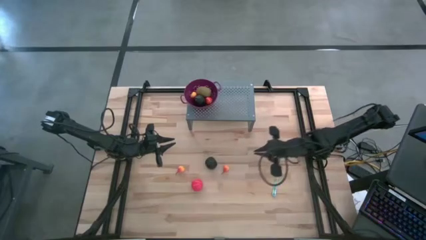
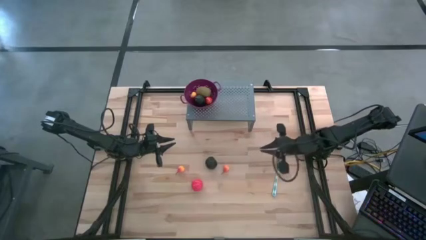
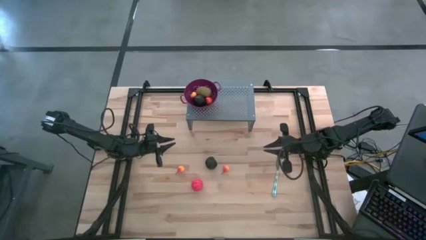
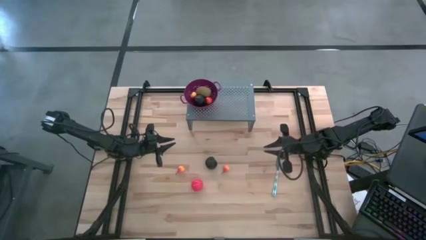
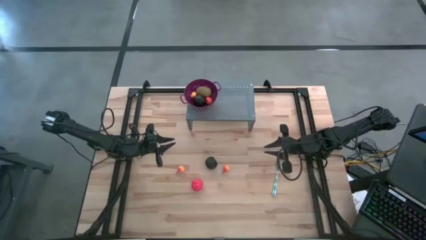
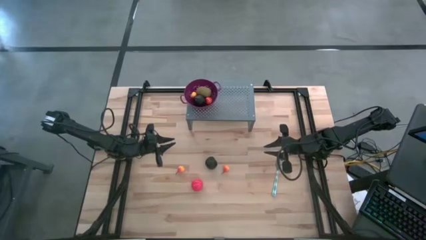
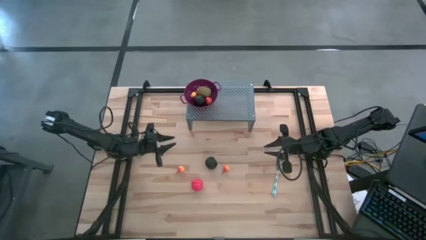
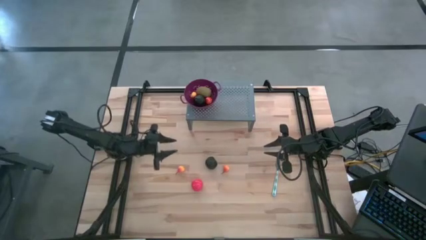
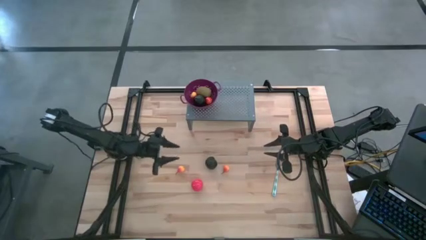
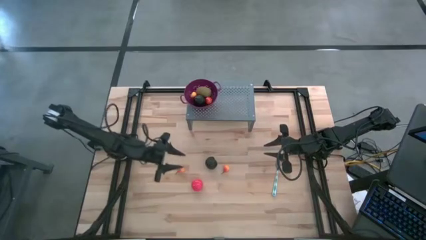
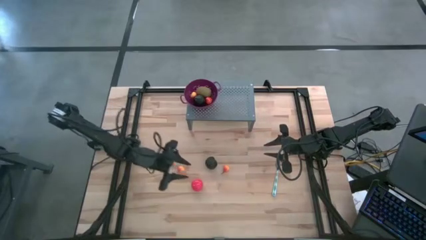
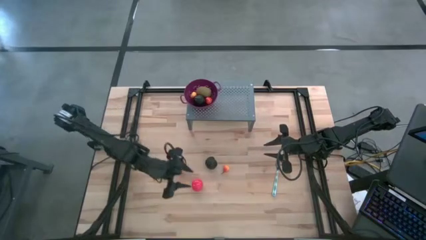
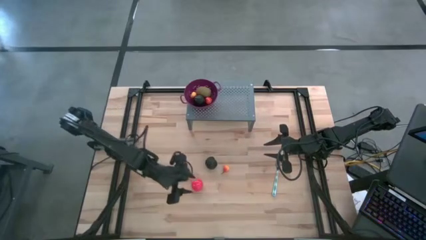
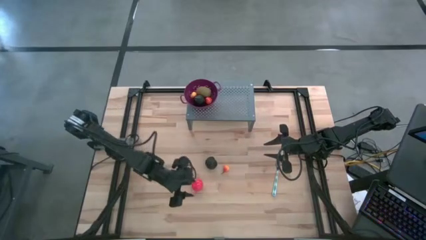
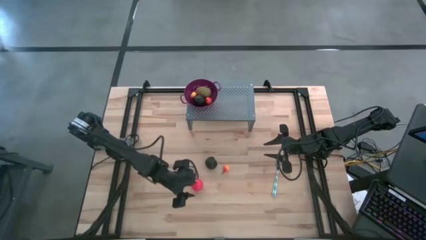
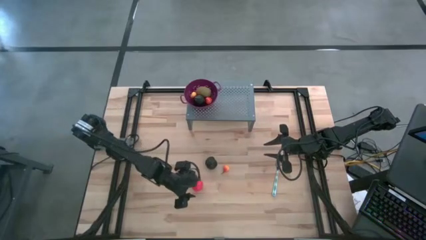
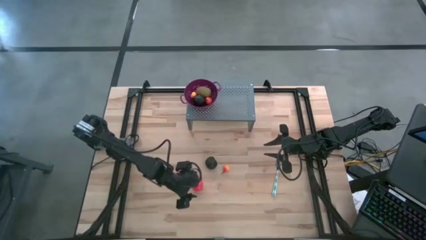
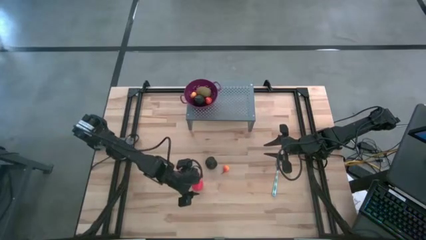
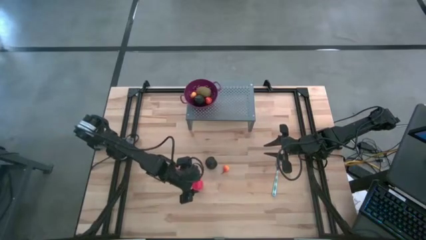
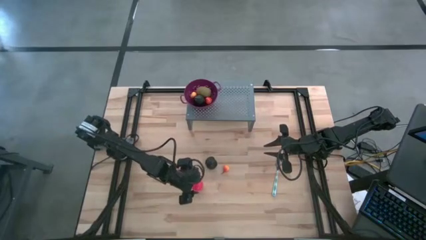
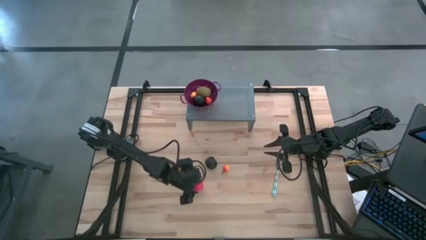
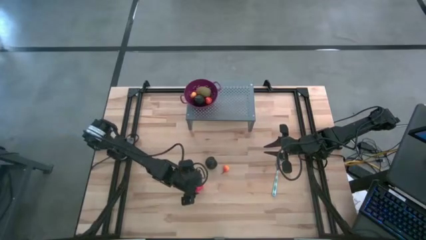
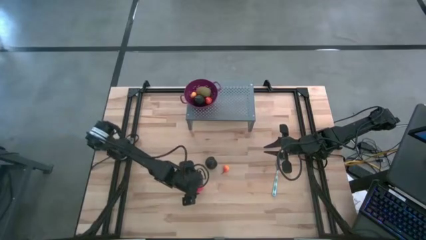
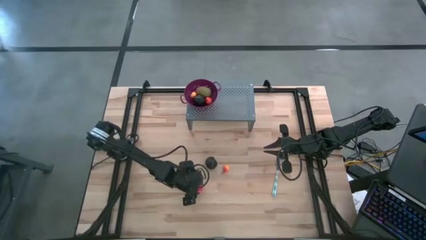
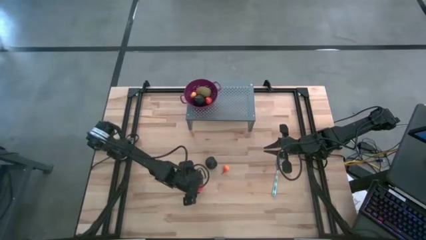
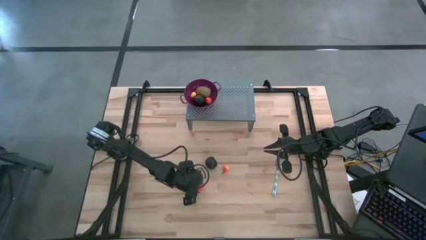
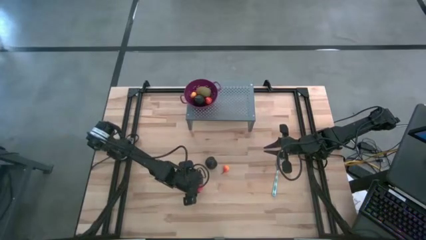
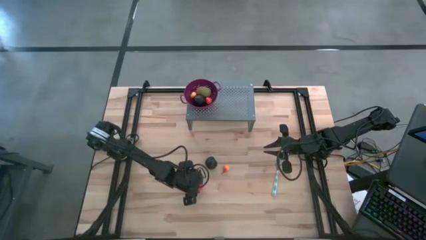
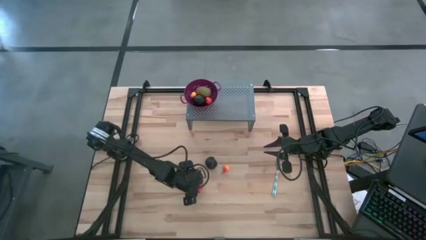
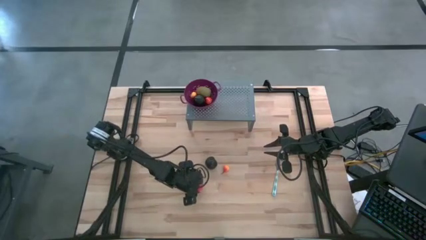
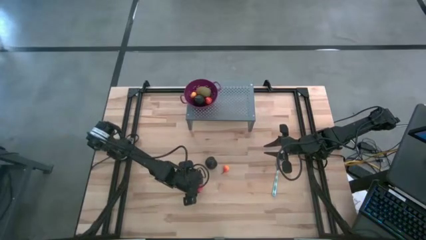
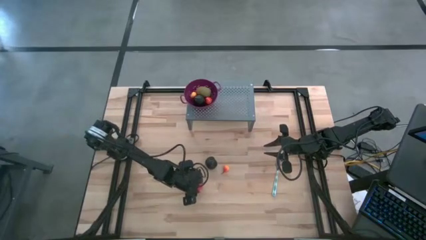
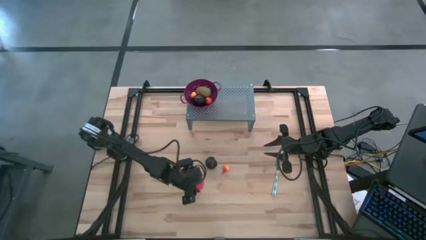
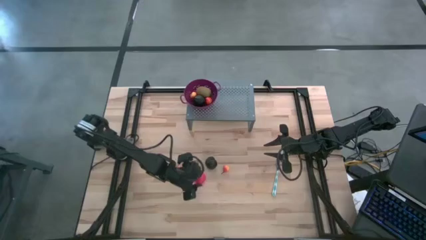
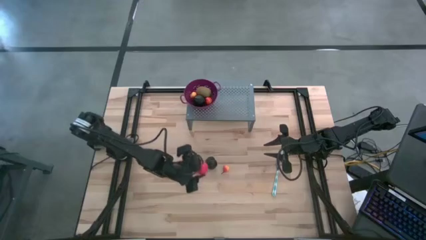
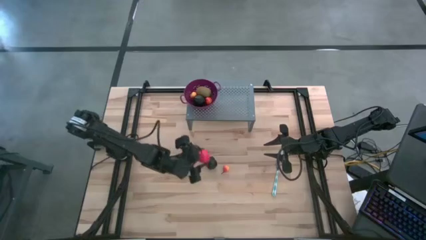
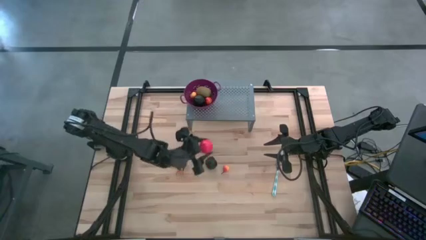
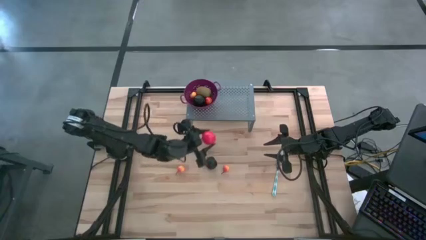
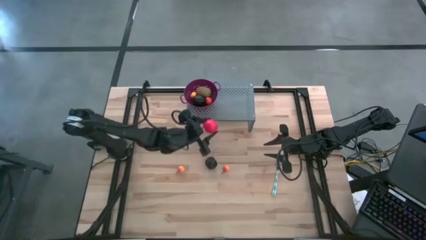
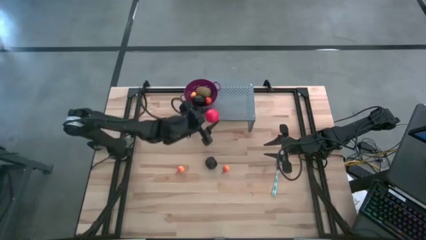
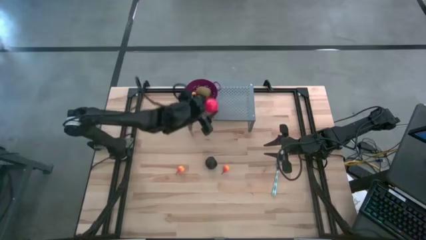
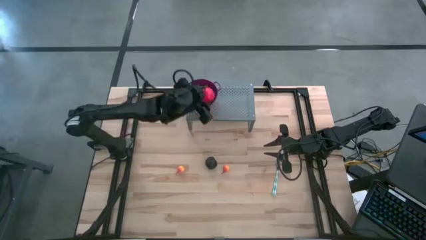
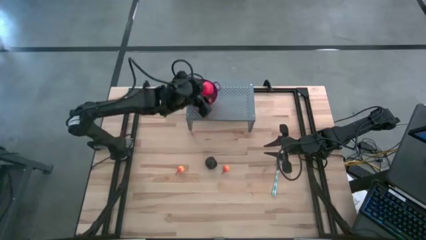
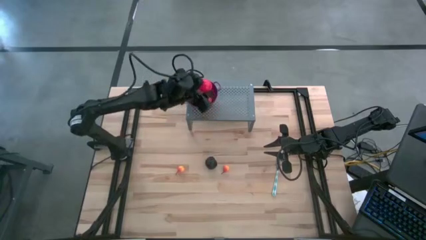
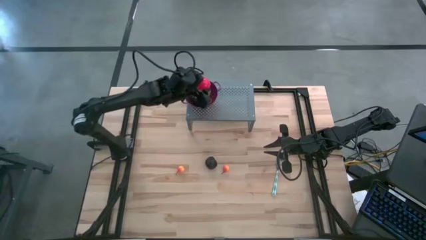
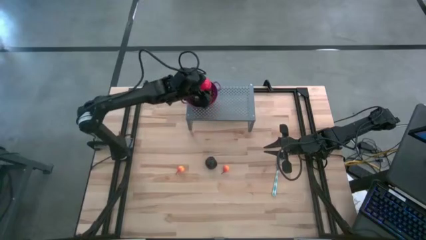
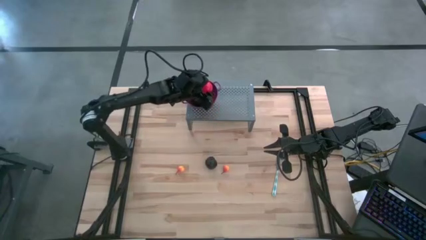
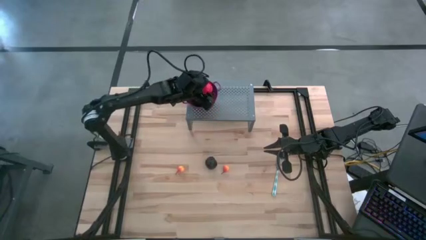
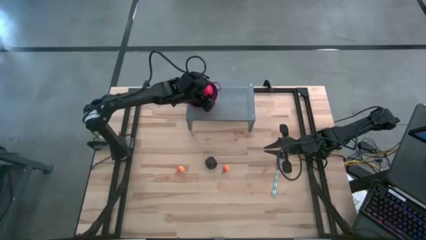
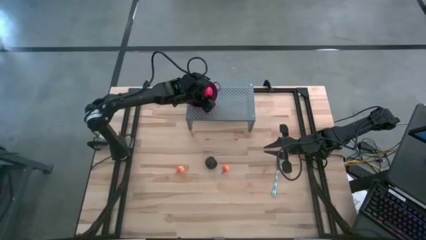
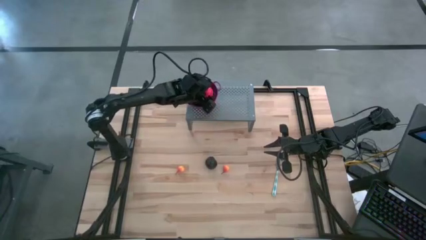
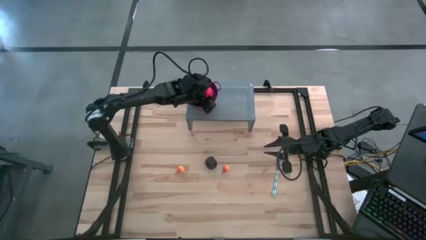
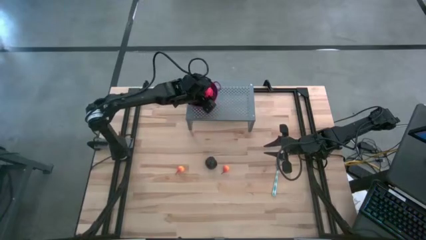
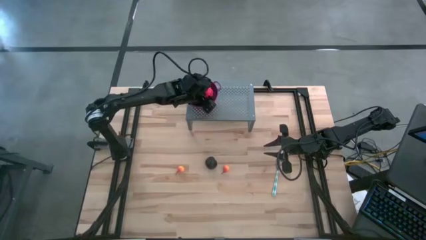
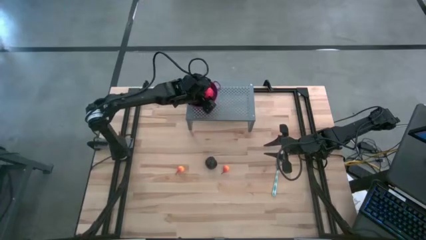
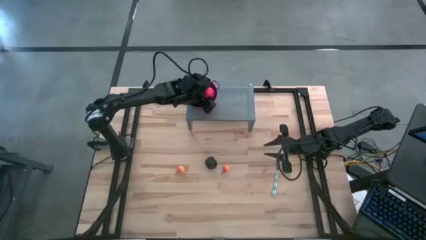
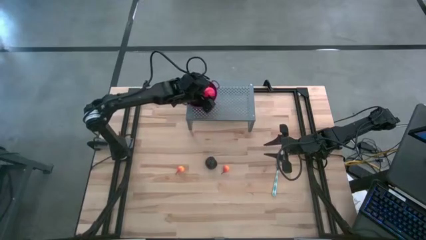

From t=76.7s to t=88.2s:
Task: Pick & Place Fruit
Put the red tomato into the purple strainer bowl on the shelf

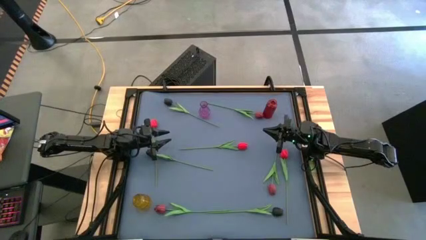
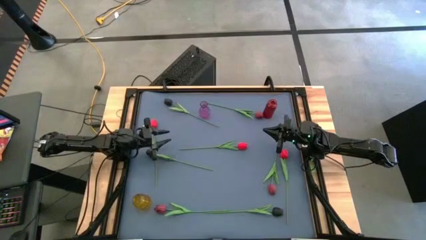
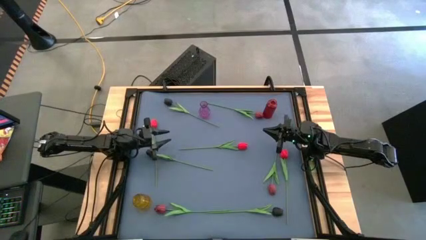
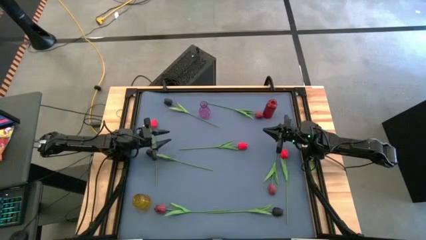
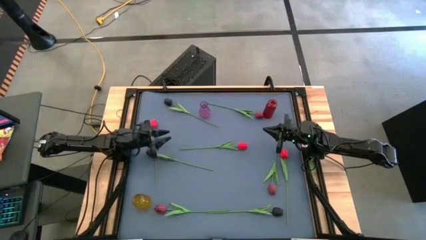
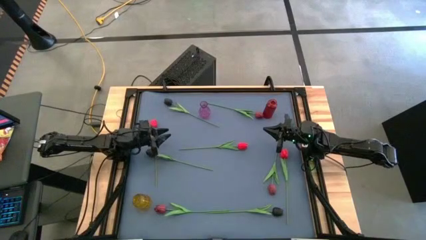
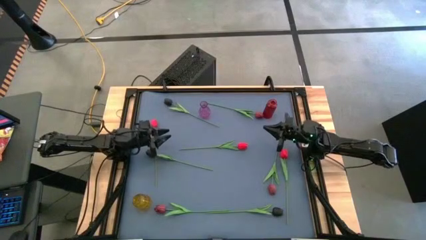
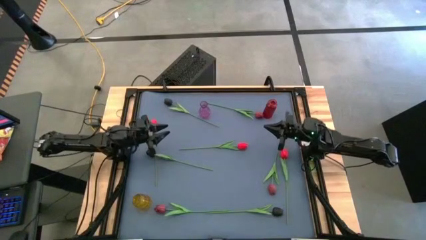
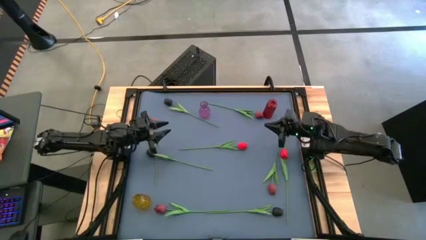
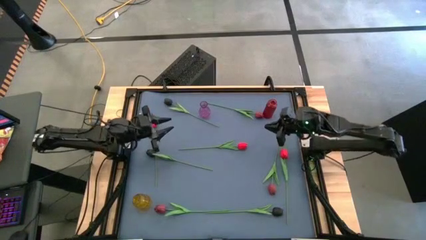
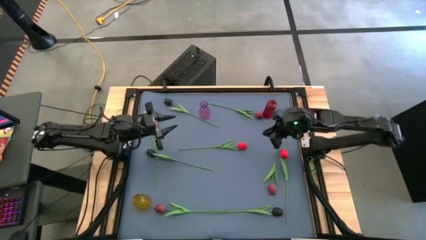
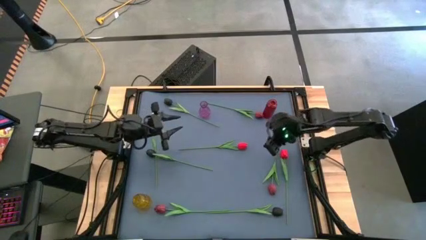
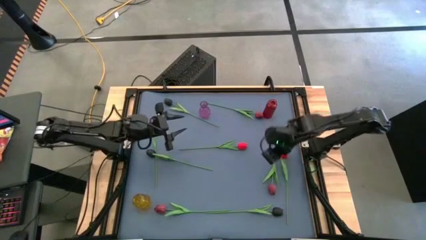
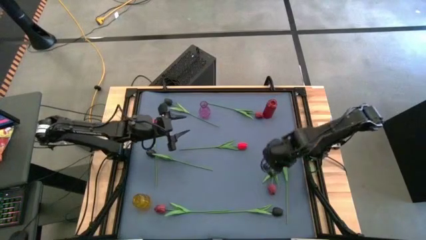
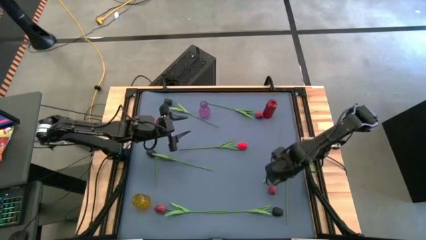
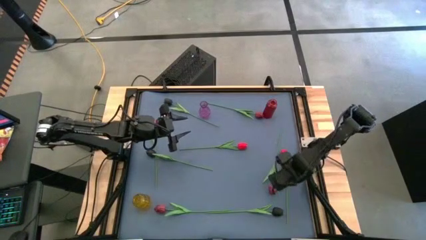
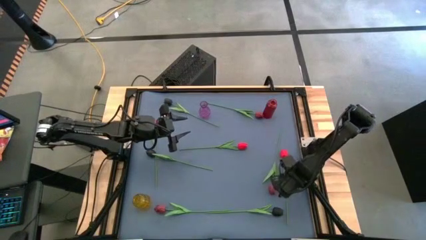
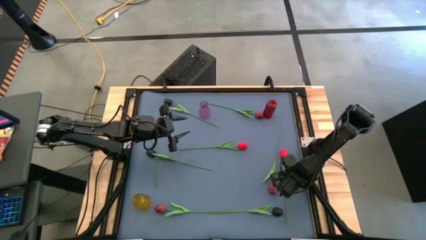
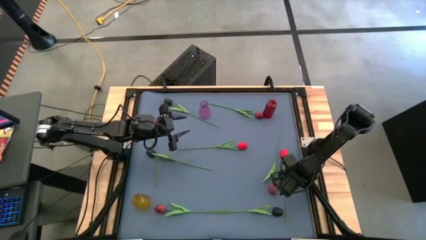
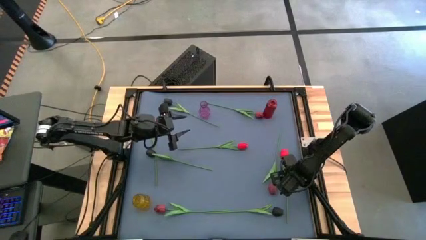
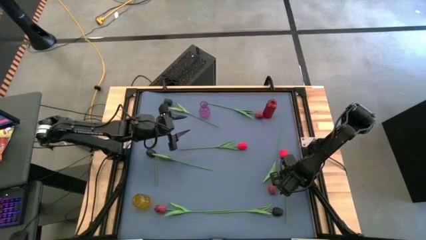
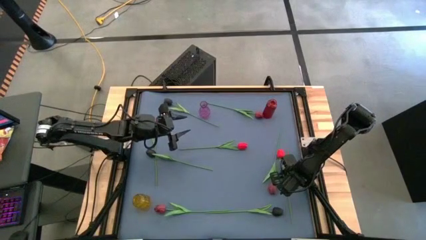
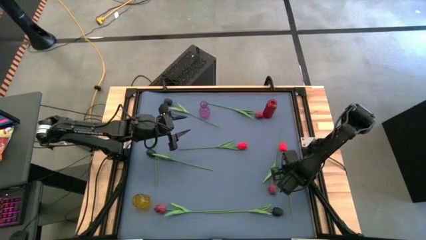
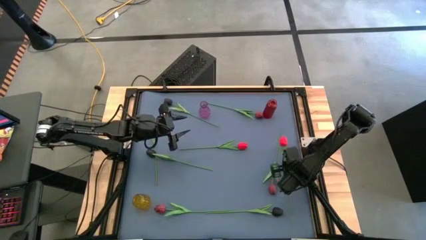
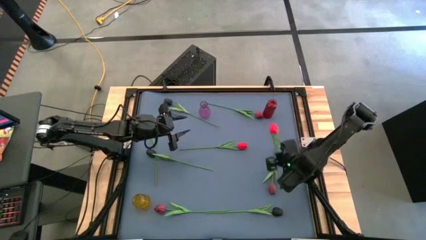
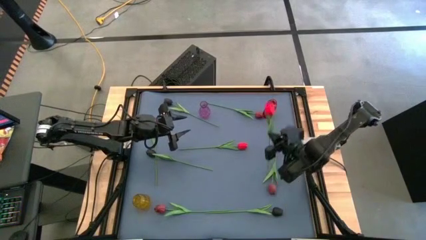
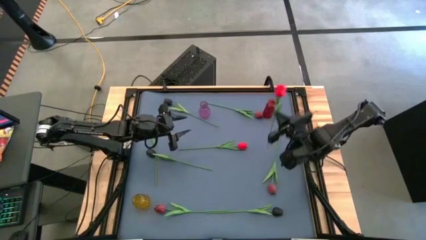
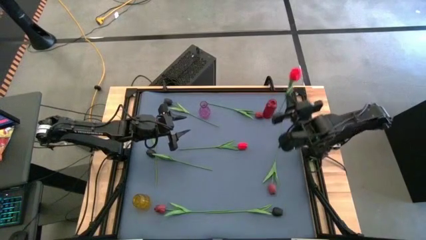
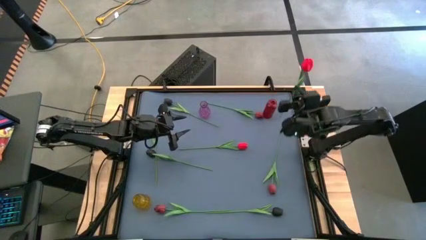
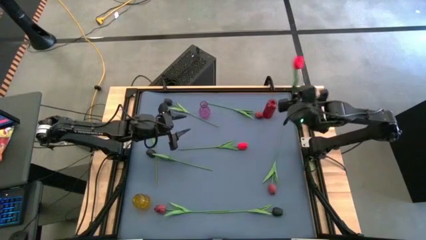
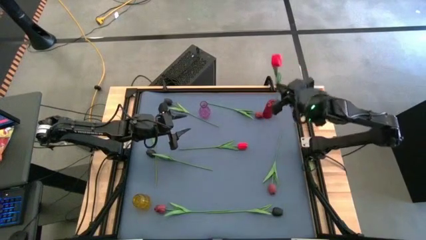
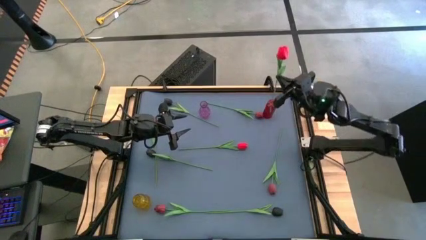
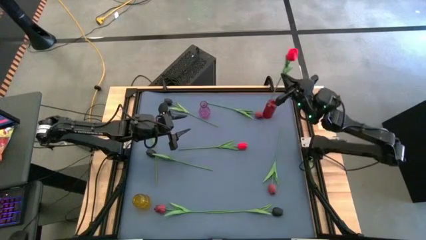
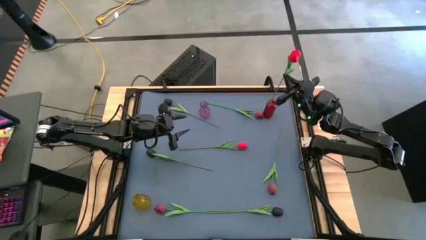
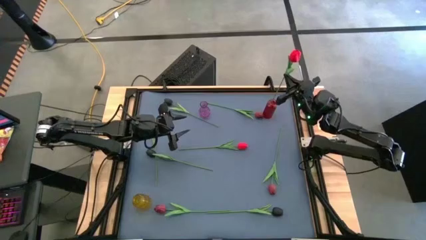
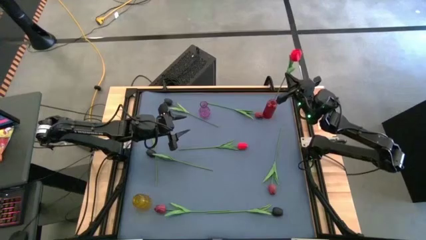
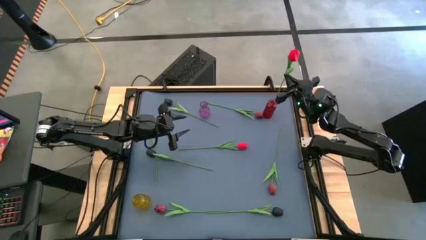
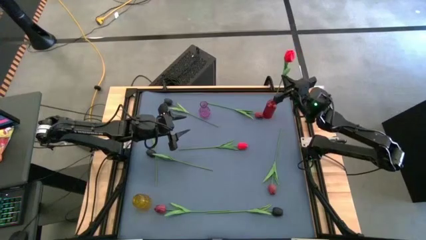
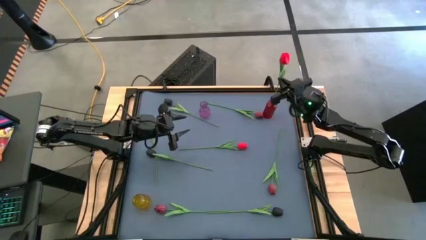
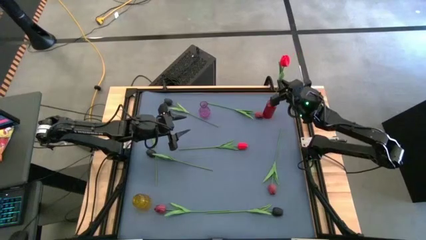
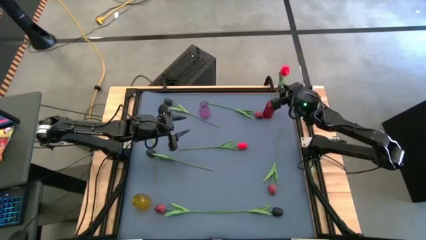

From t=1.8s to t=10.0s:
Task: Sort flowers into vase by color
Put the right red flower into the red vase
